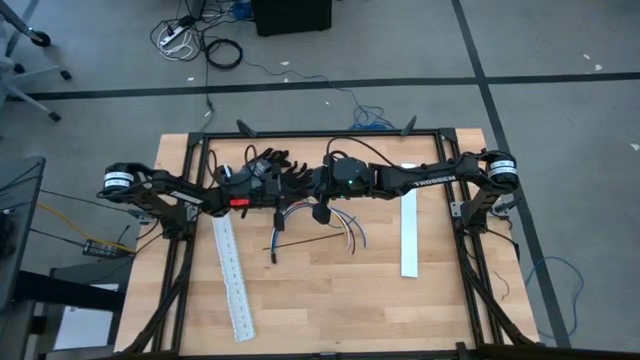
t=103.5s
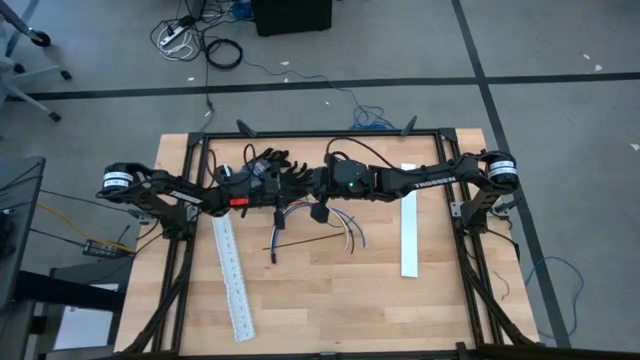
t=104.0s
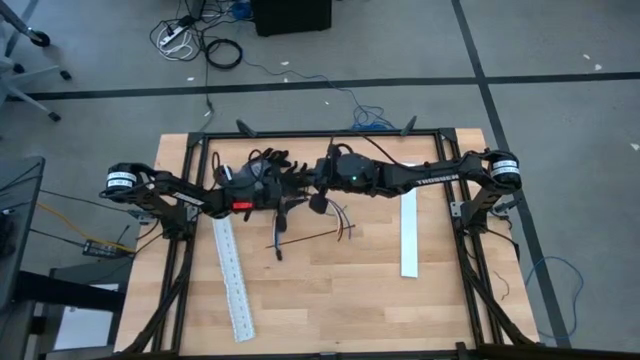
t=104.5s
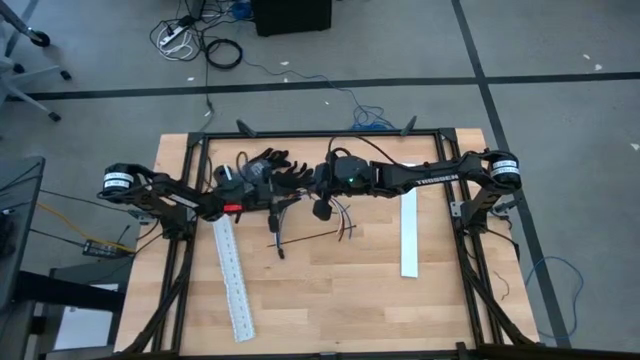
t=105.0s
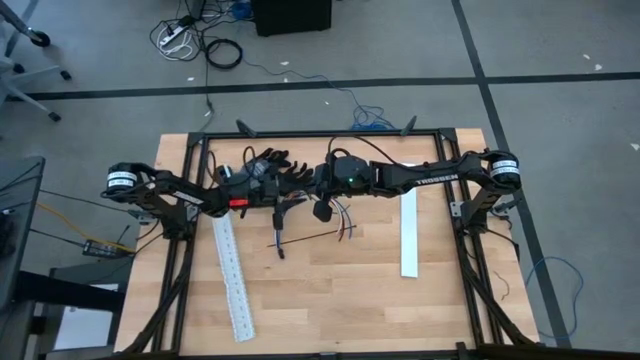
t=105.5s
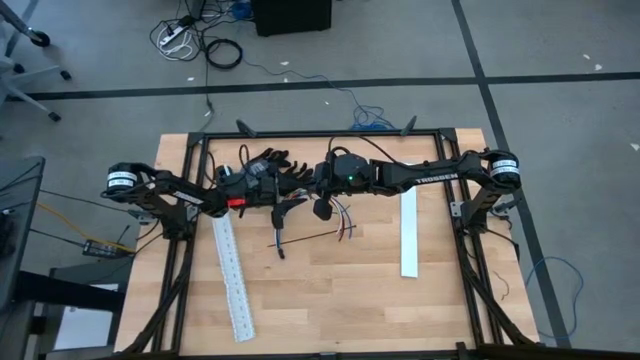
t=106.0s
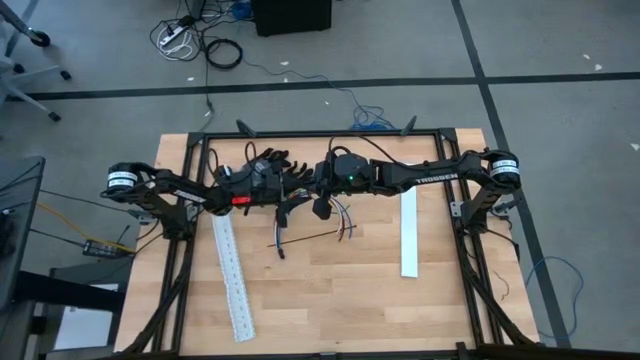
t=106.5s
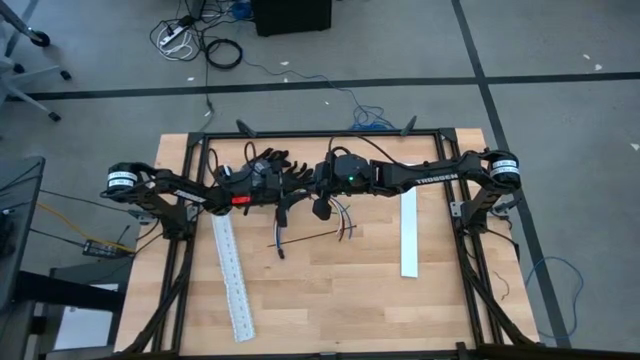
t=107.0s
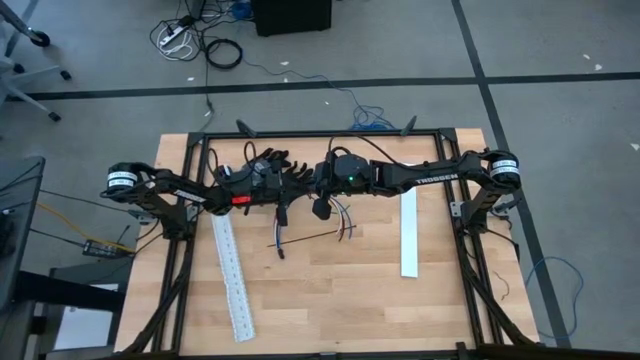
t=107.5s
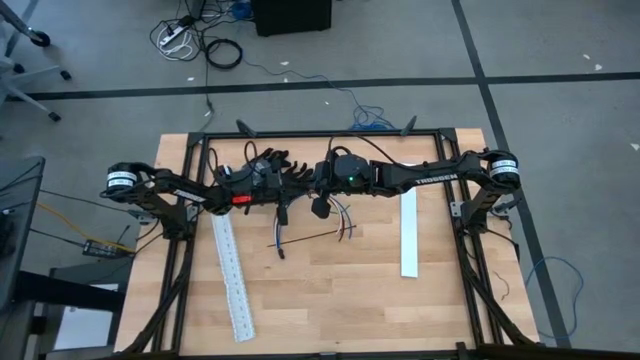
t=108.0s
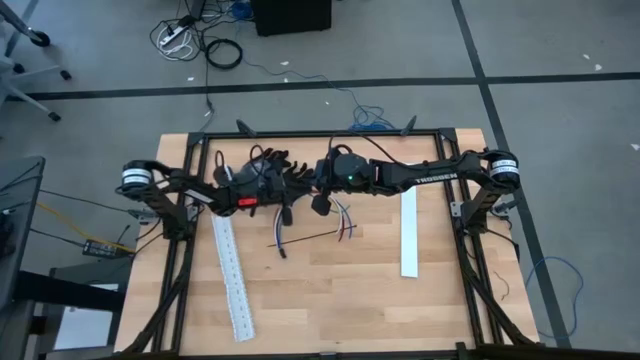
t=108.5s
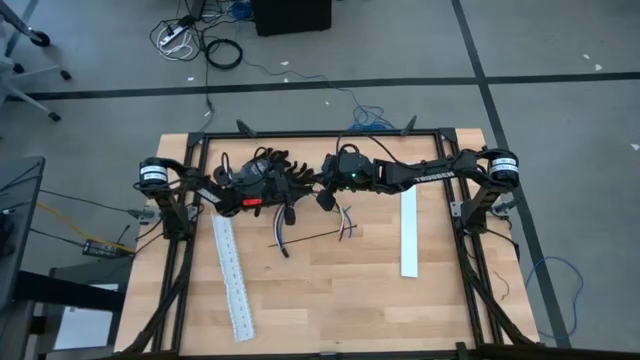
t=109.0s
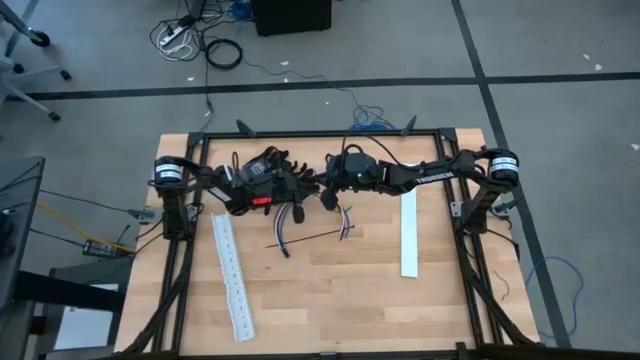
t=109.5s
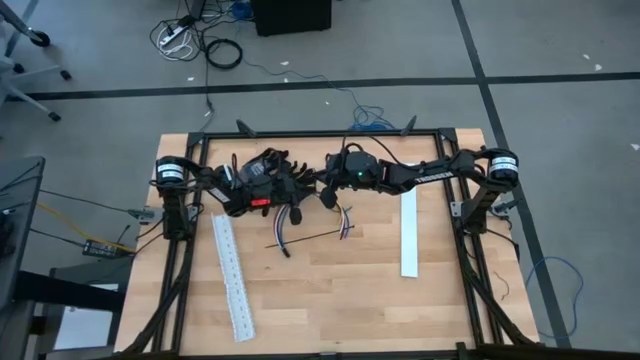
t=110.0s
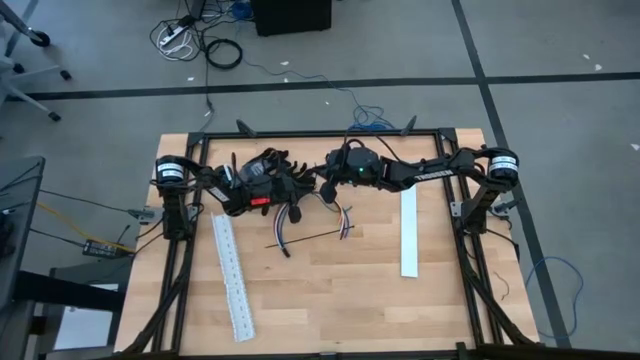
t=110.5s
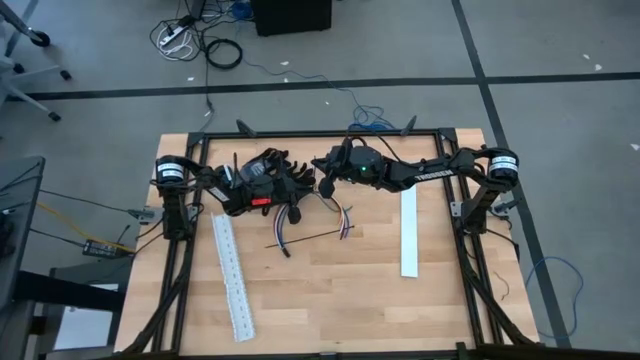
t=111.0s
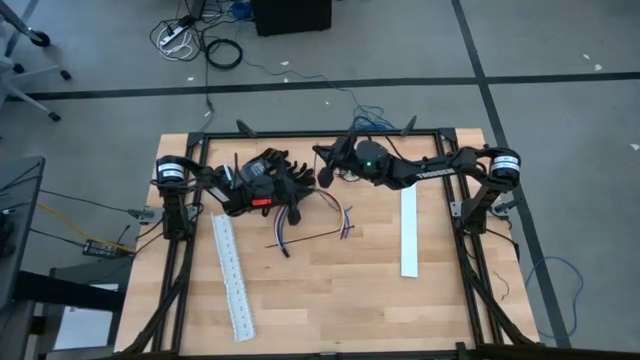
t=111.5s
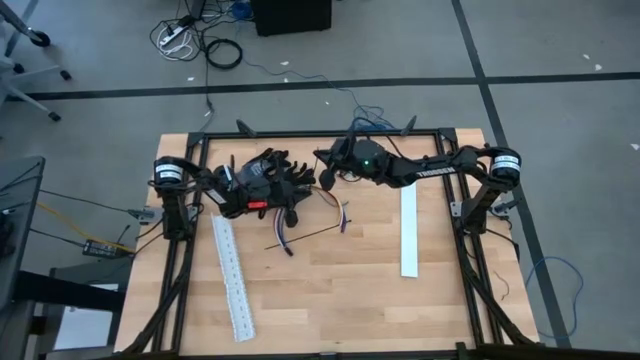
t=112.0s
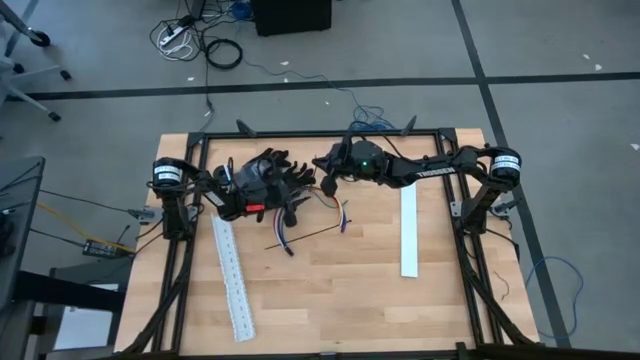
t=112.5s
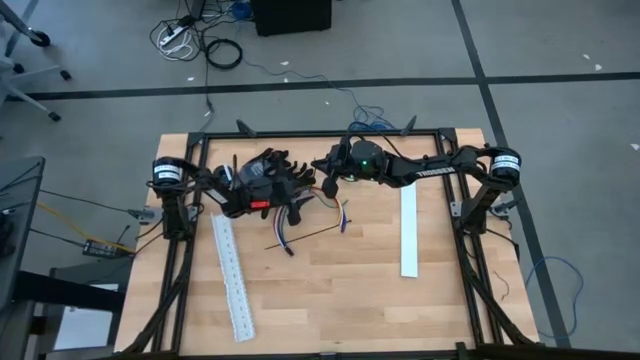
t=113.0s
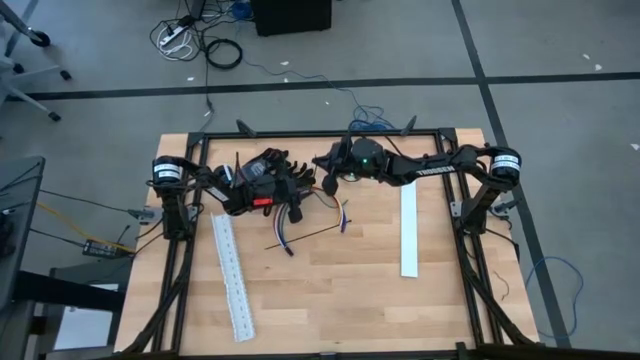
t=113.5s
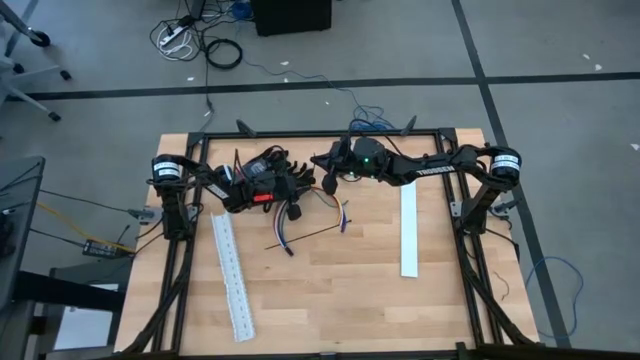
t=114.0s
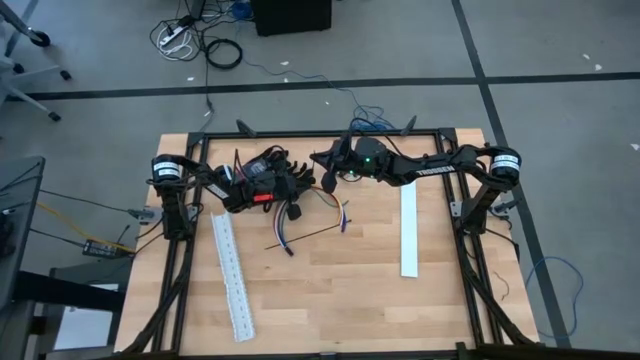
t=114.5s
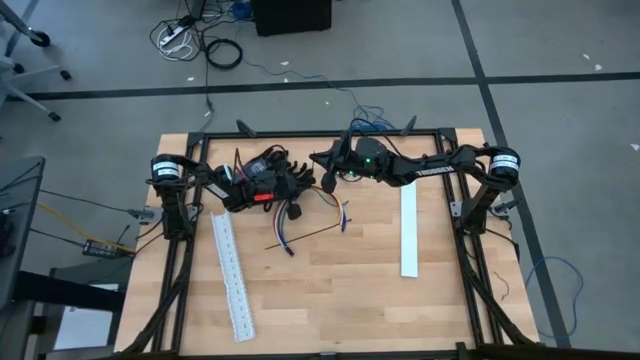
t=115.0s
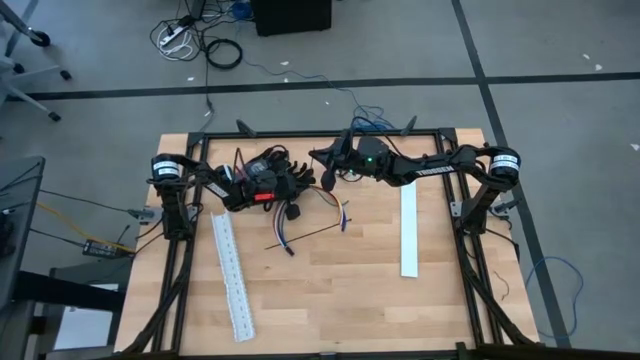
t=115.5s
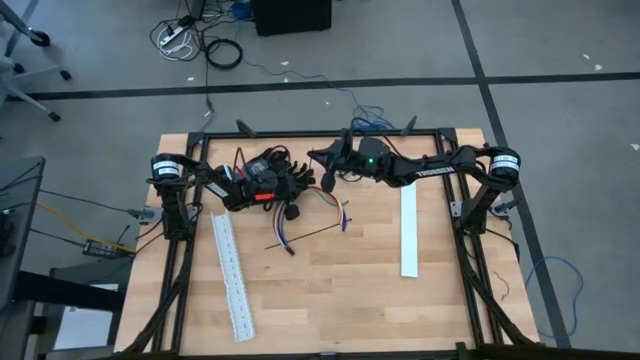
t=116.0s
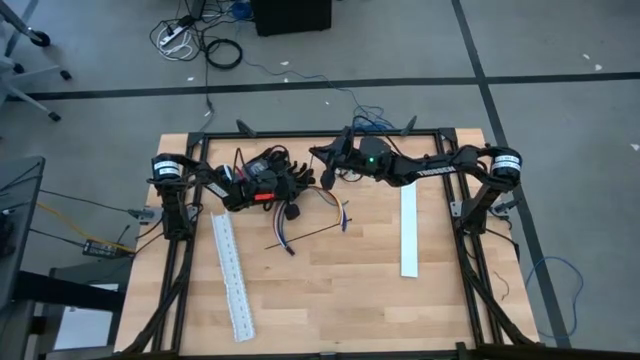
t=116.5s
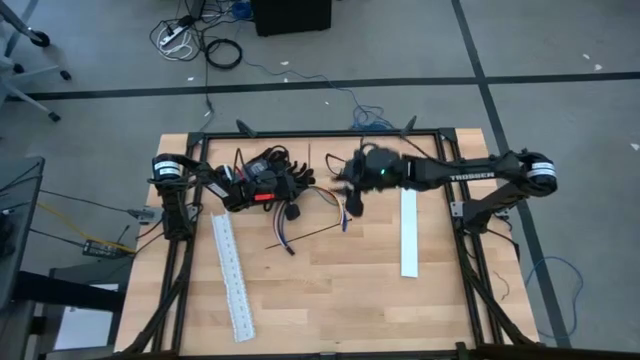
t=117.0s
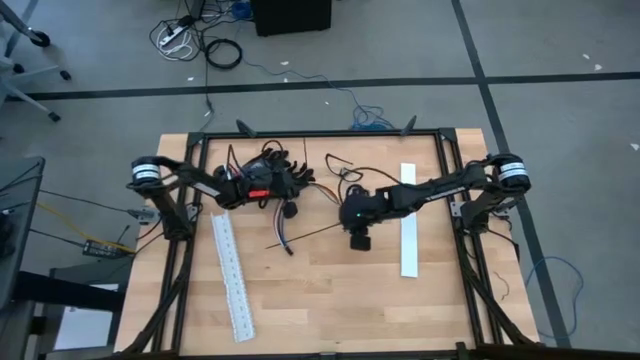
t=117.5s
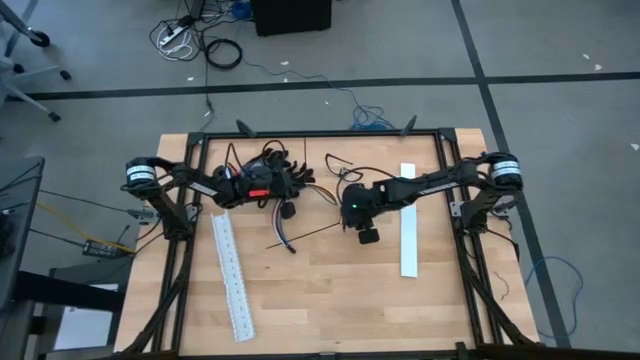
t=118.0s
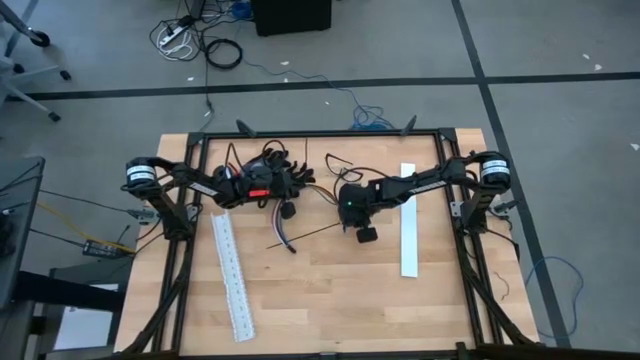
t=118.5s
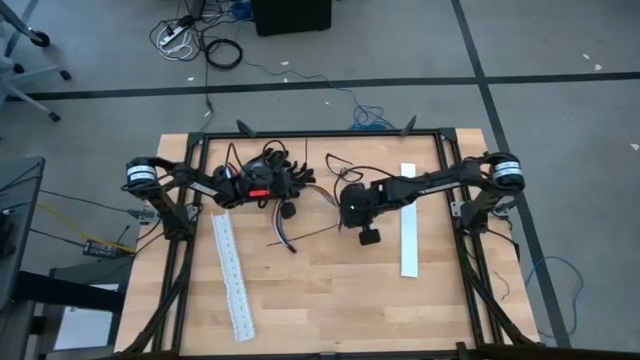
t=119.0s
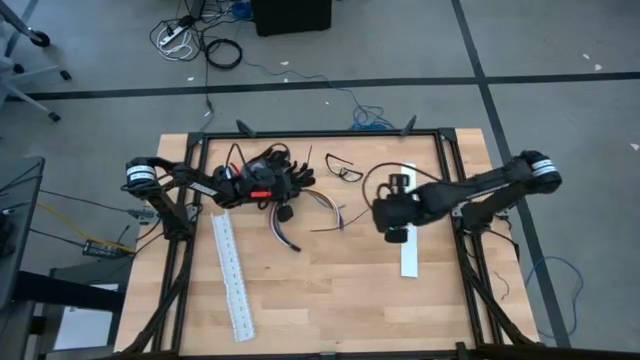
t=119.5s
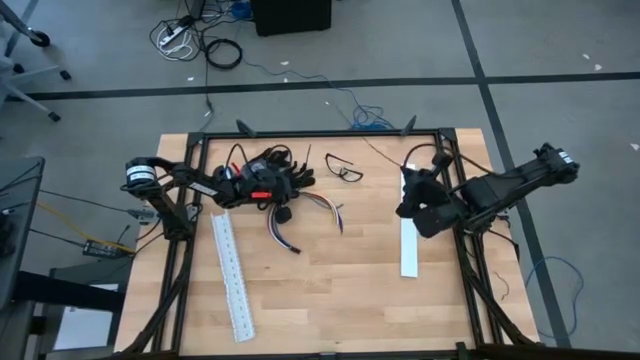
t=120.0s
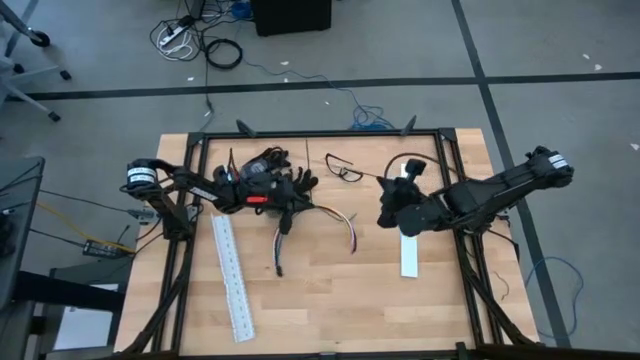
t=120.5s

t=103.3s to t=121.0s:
Task: Ziptie cables
Wrap the cables together using the black zip
